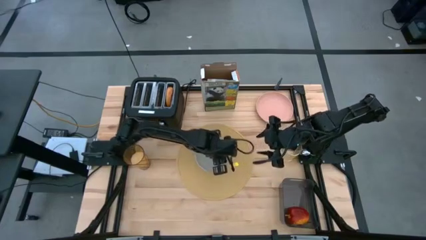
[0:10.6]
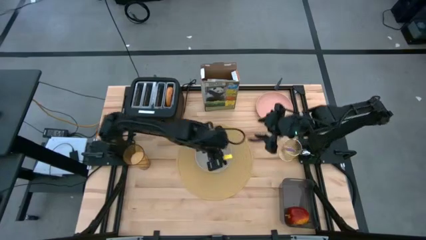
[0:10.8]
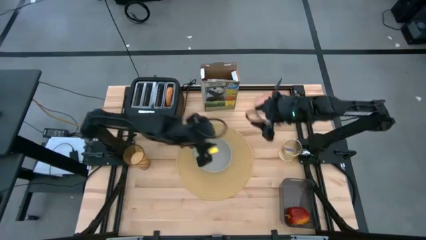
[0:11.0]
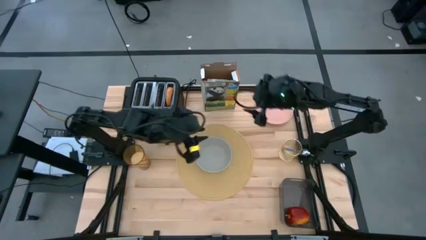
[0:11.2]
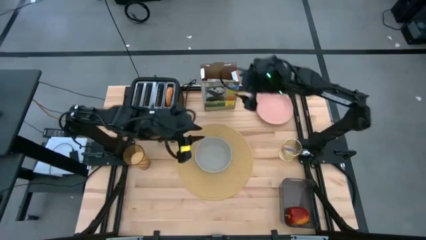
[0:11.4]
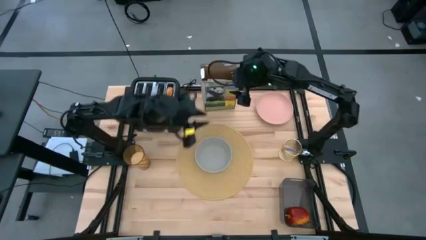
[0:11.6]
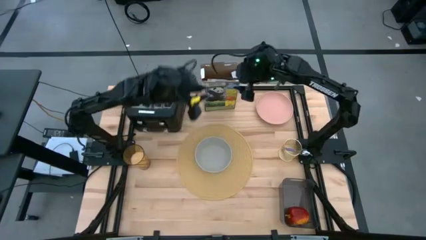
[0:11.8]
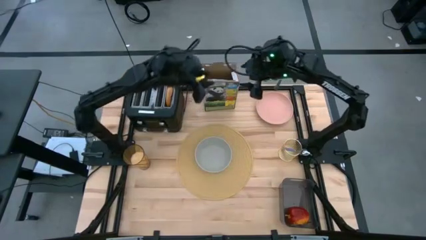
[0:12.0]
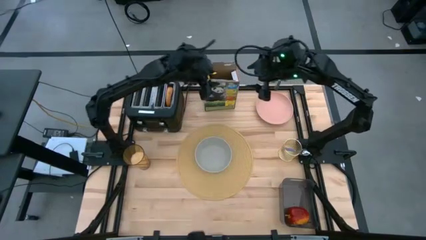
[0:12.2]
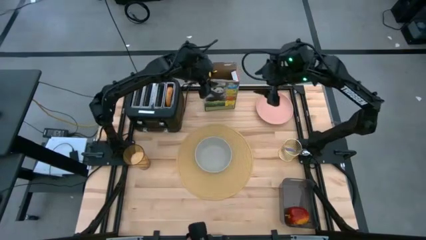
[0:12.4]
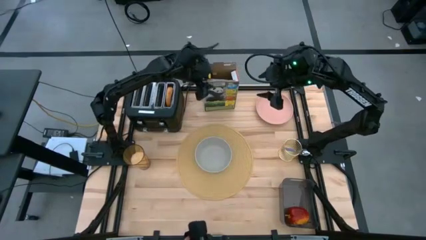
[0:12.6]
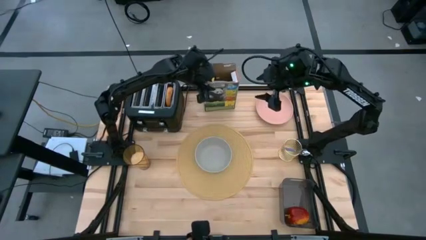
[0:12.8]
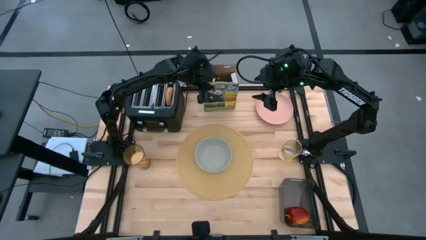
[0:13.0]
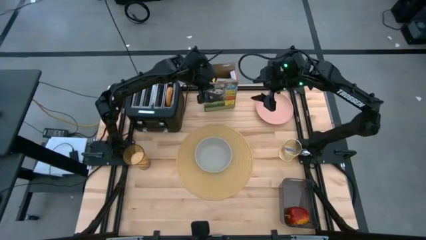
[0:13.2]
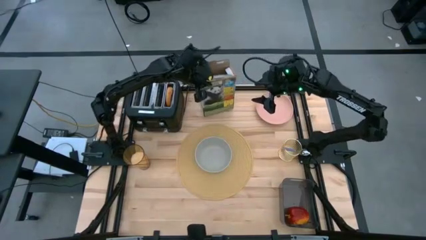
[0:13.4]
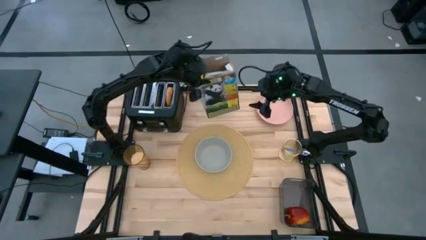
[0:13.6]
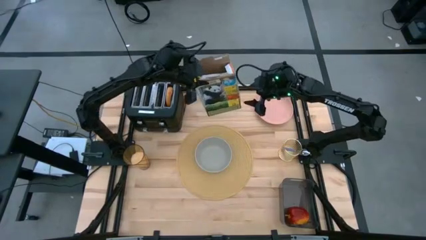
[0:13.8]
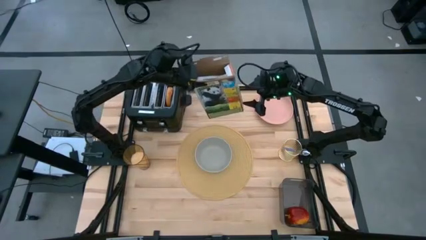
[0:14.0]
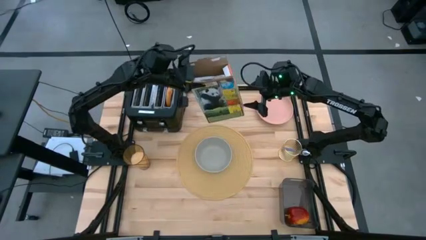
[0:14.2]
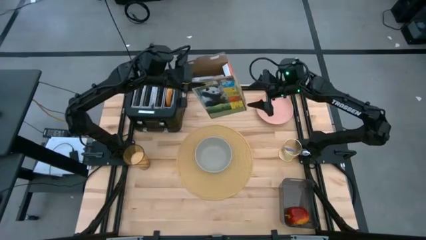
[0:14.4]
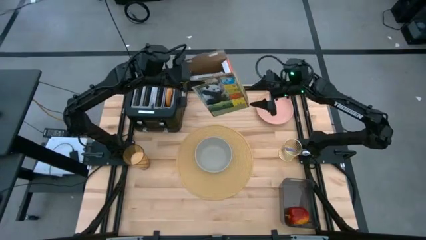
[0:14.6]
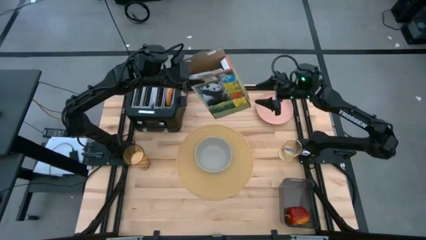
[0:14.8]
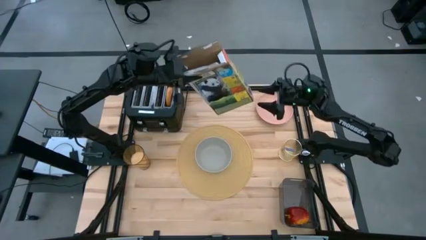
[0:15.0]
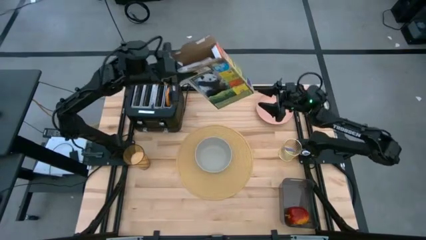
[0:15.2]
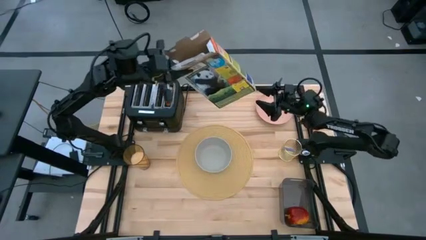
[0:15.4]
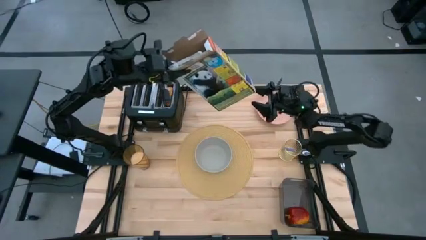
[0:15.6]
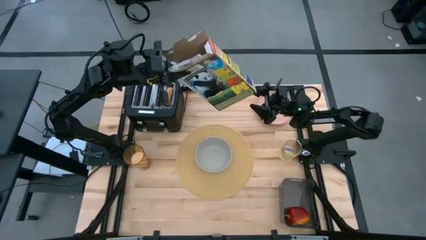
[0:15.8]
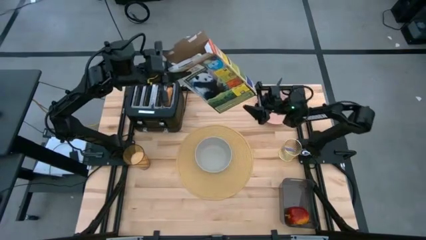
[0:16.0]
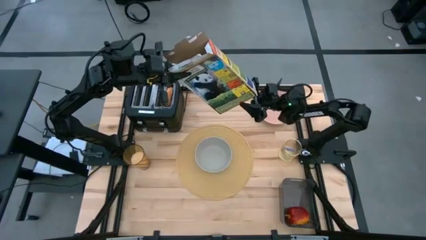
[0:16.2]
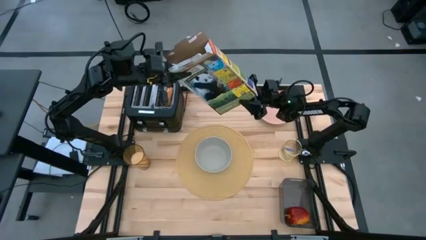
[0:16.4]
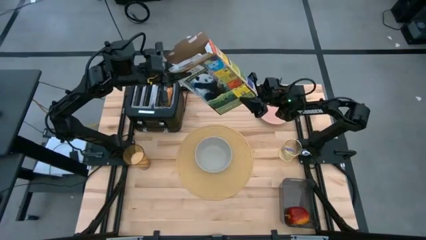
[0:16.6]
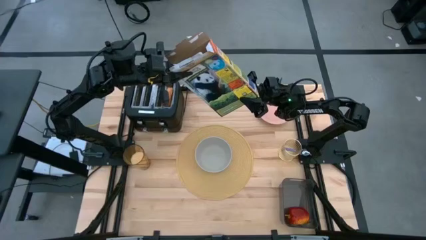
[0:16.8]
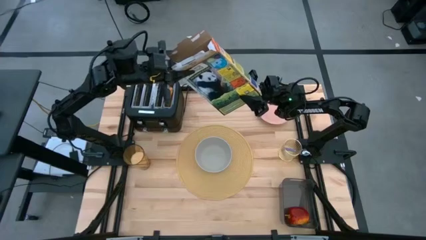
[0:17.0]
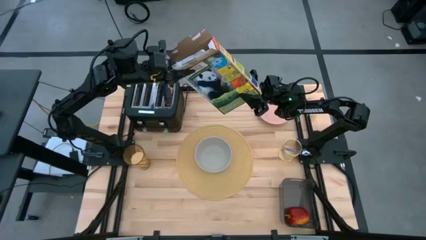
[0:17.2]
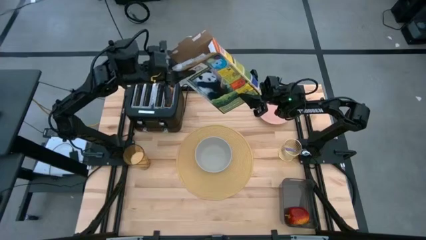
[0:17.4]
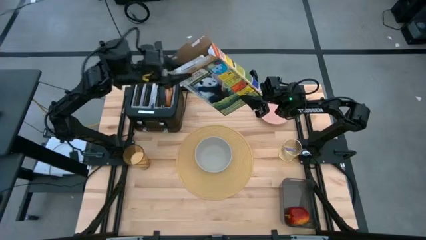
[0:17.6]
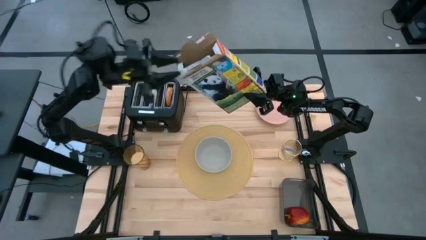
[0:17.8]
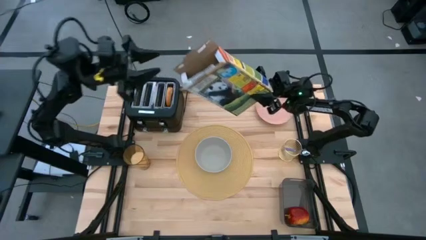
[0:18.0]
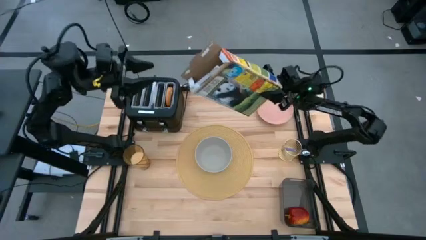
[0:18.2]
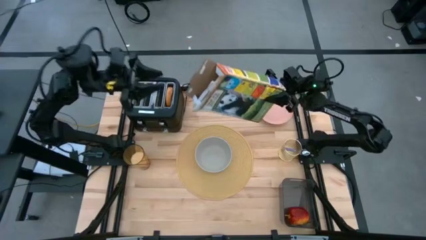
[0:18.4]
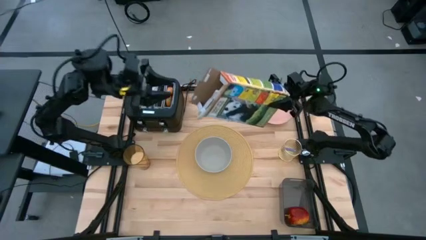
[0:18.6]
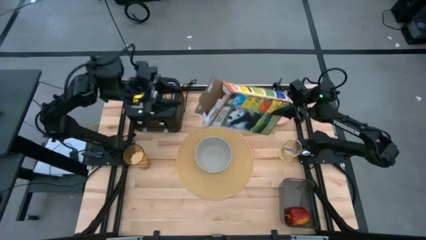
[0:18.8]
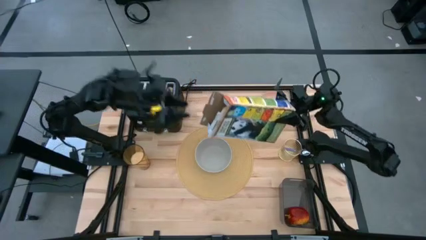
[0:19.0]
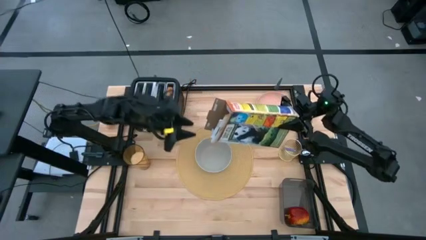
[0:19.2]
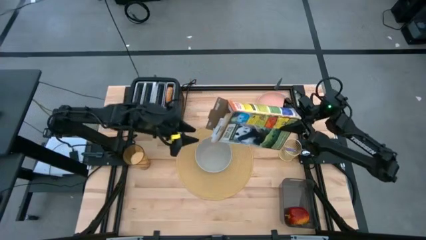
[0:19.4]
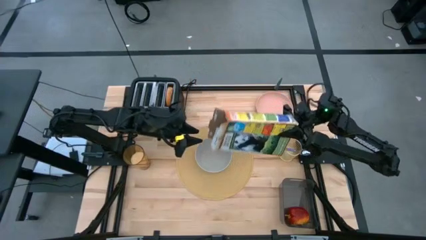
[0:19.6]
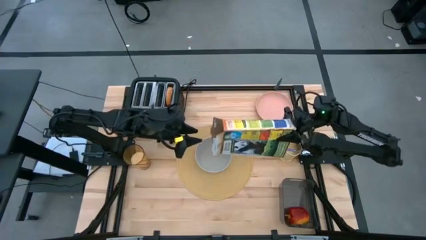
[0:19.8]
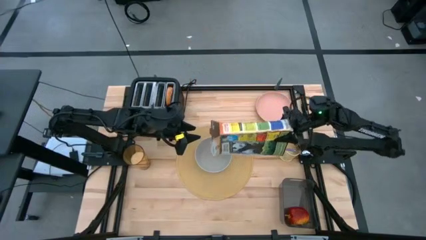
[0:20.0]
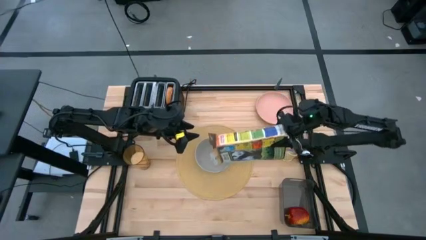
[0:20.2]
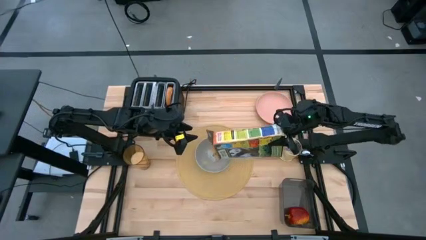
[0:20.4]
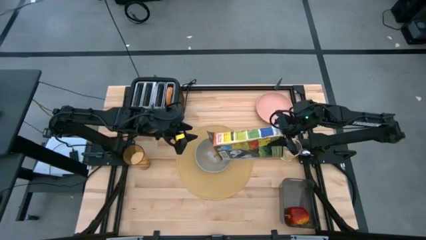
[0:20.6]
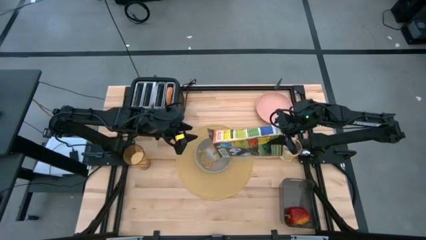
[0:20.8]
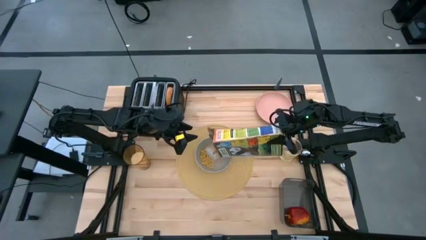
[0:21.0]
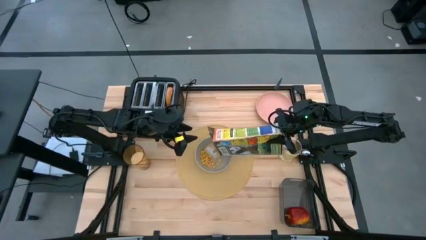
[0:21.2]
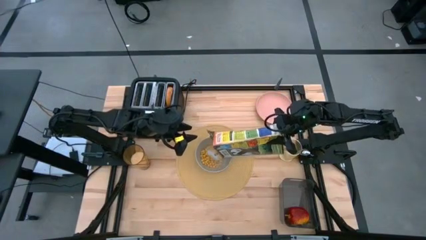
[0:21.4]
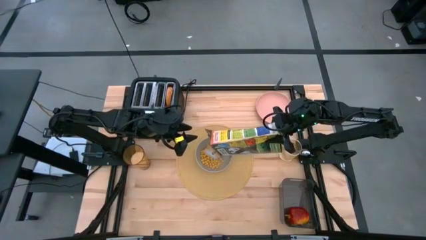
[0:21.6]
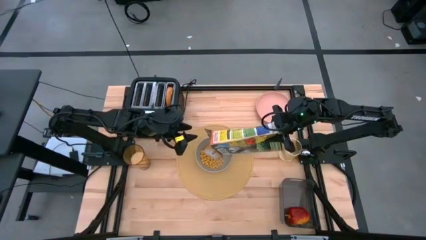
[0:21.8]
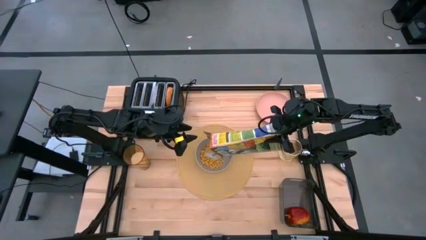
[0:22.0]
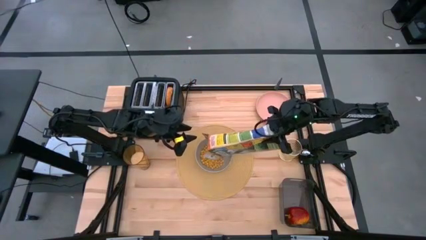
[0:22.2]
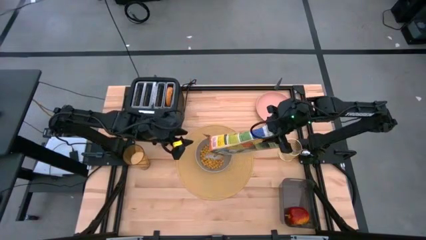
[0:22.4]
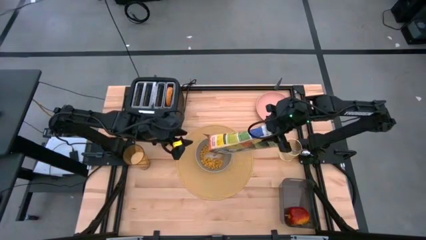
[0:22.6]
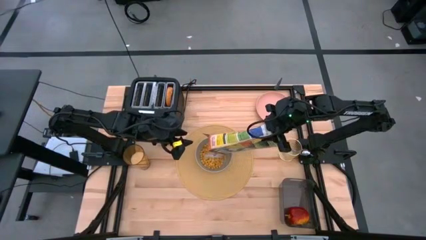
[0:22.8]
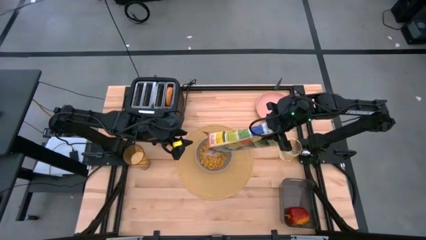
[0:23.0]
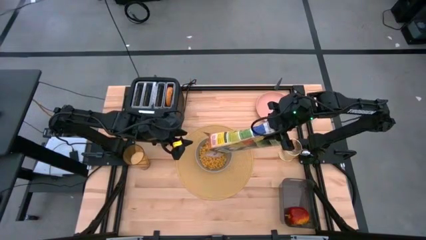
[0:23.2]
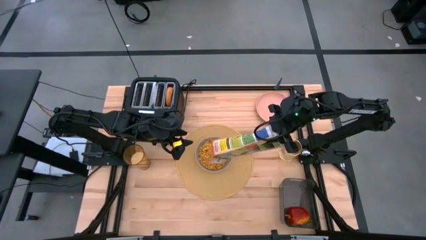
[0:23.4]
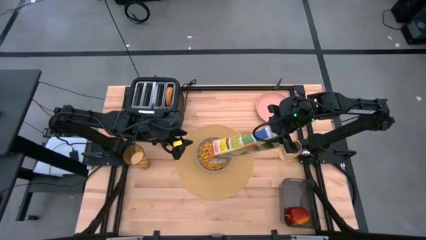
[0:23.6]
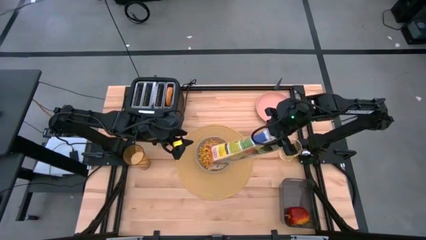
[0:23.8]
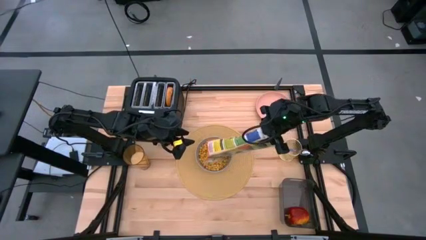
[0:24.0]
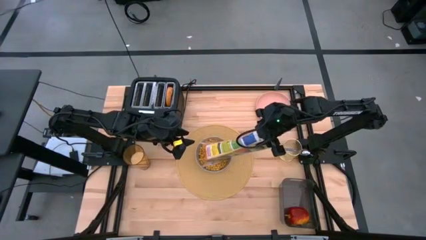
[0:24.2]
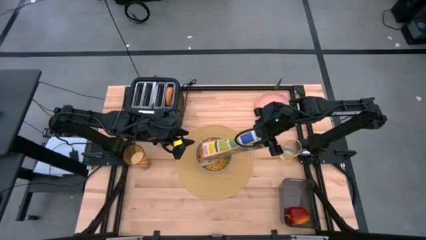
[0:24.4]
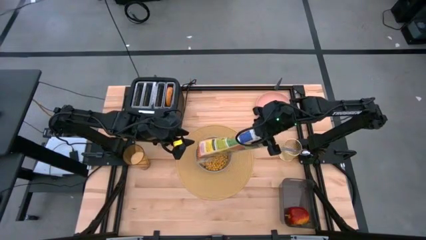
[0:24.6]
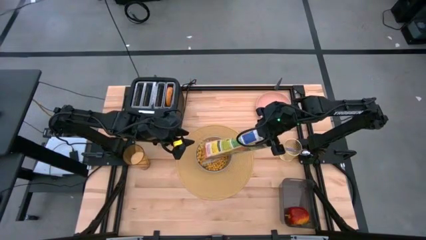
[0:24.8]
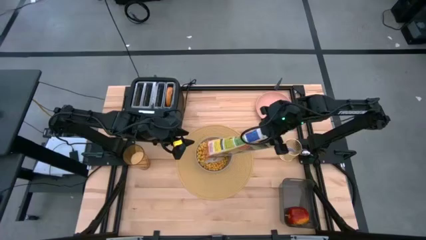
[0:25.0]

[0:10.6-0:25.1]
Task: Arrange a breakfast setting
Pour the cereal from the cereal box into the gray bowl
